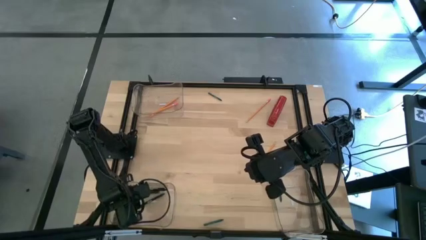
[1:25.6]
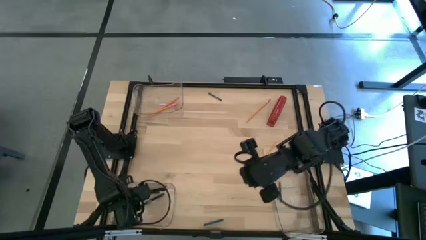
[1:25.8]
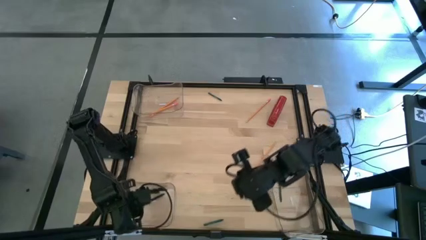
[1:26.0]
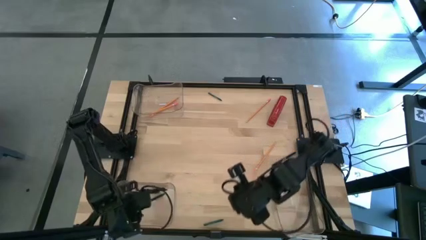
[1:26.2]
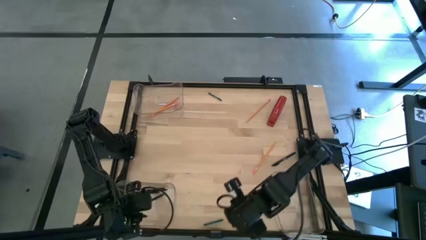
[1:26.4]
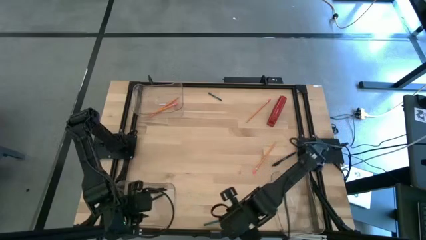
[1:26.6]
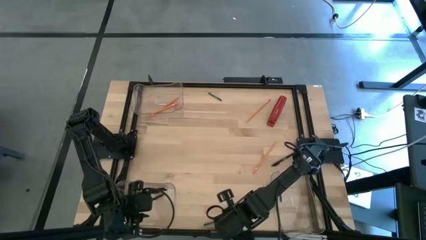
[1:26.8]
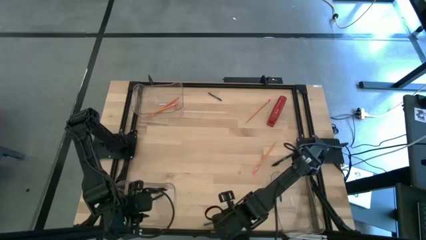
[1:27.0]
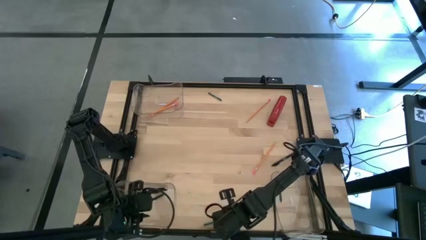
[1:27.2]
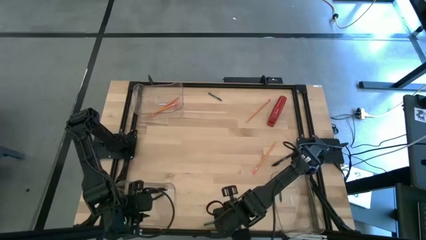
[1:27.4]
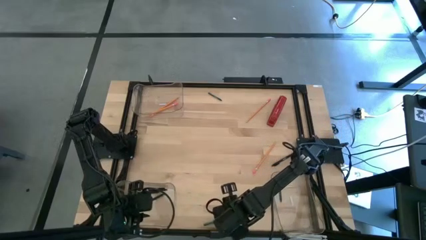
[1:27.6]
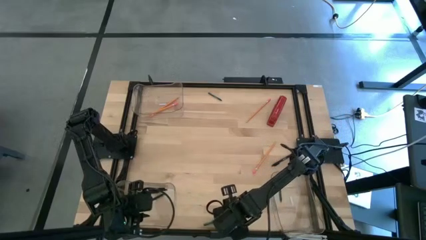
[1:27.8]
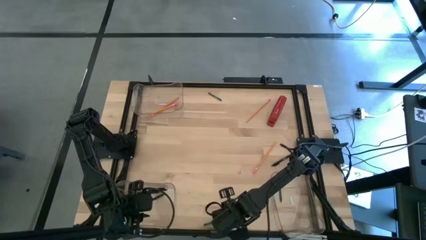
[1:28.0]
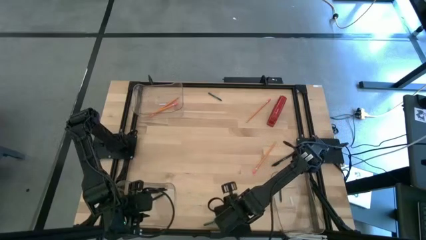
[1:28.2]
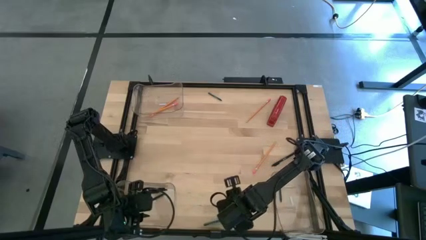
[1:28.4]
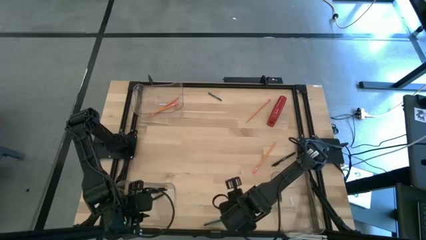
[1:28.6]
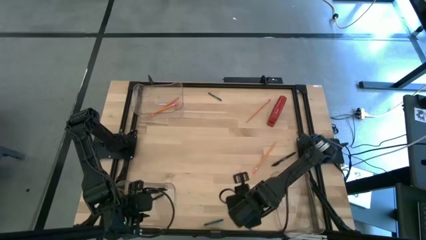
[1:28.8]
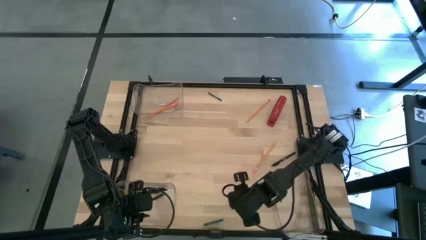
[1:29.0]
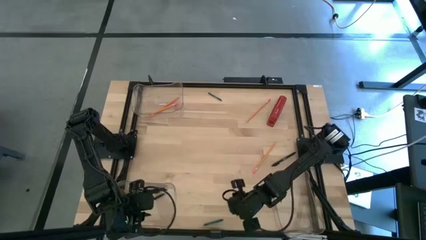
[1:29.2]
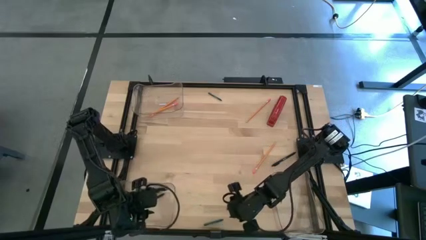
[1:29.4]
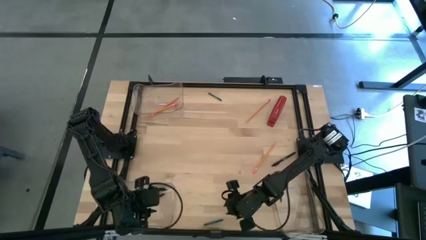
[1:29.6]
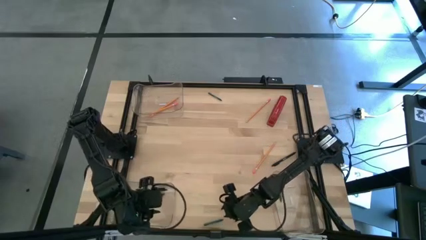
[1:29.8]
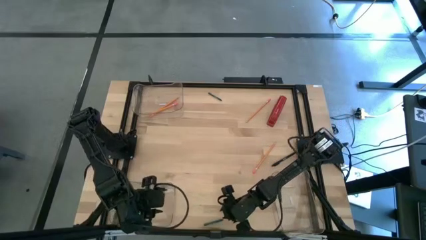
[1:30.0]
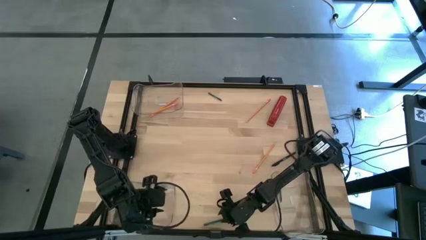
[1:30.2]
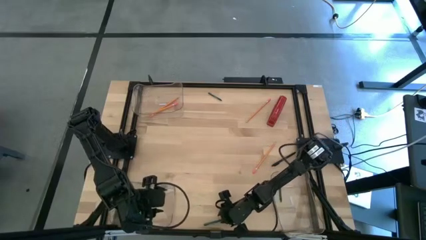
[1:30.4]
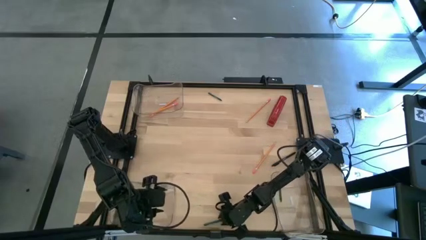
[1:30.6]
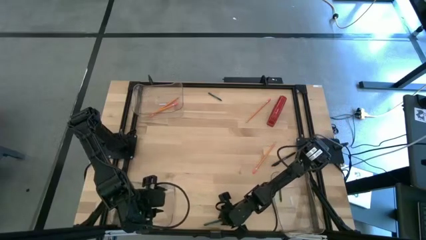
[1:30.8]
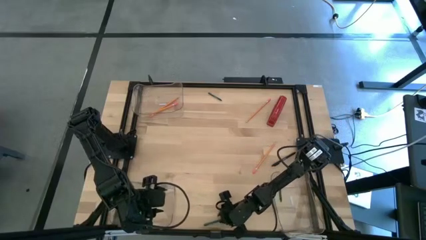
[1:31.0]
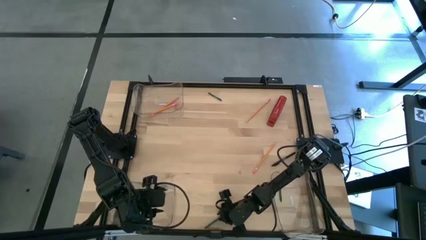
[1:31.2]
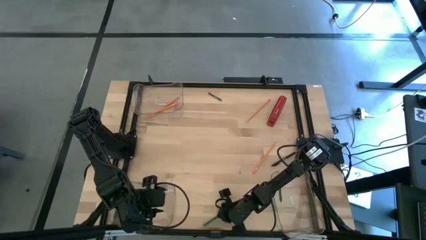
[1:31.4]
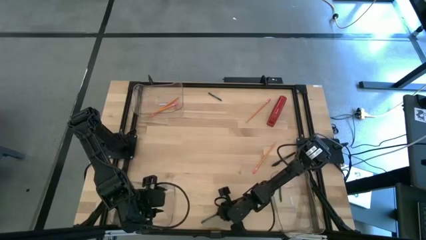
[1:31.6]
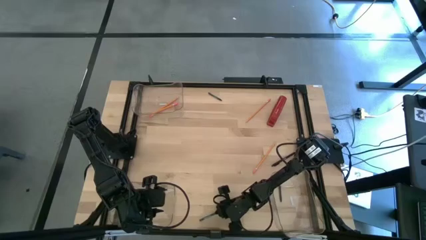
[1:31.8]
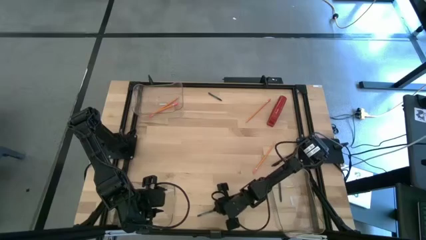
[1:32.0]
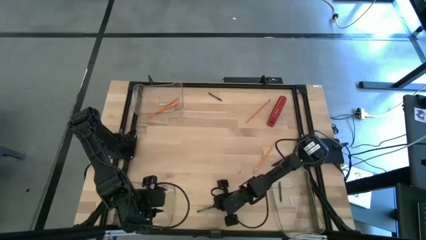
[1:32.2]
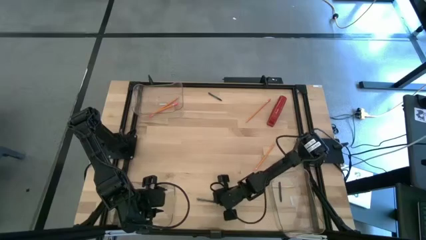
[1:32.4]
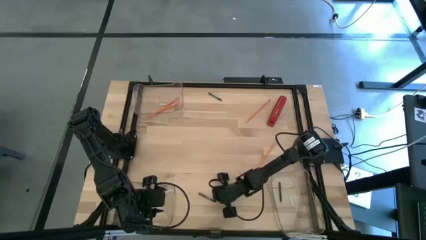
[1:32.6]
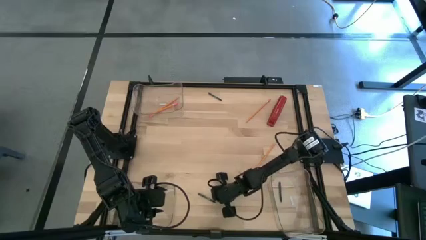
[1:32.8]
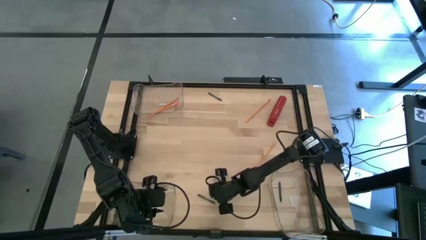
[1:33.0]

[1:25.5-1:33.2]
Task: Sort crayons/erasers/pens/pencils in bins
Put the green crayon into the bottom right transparent bin

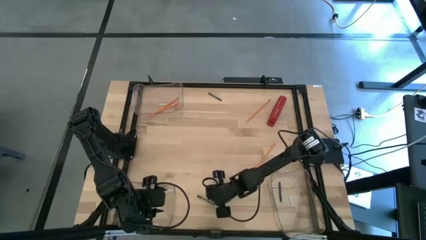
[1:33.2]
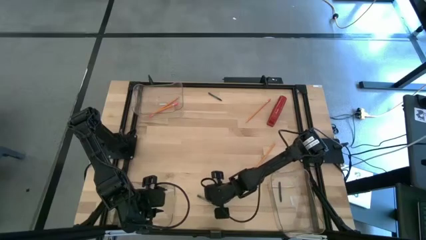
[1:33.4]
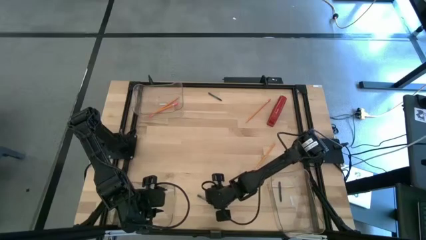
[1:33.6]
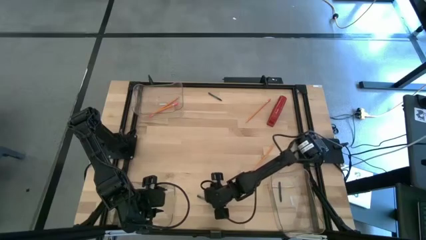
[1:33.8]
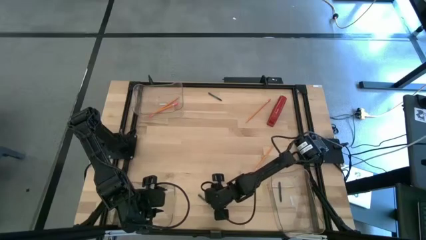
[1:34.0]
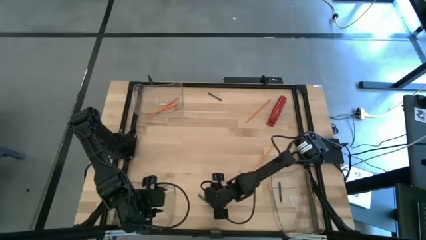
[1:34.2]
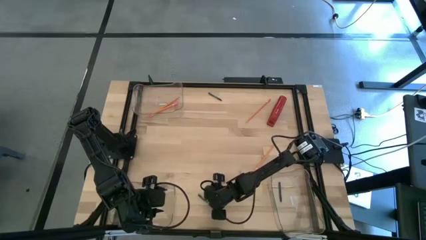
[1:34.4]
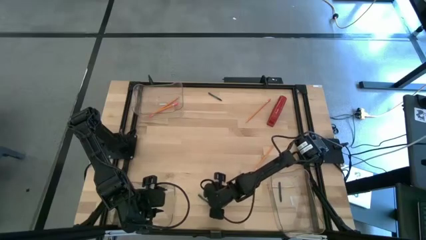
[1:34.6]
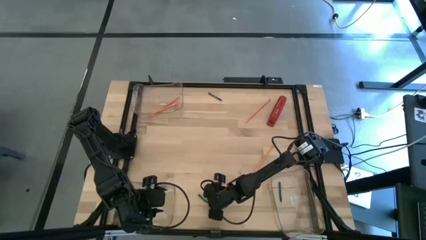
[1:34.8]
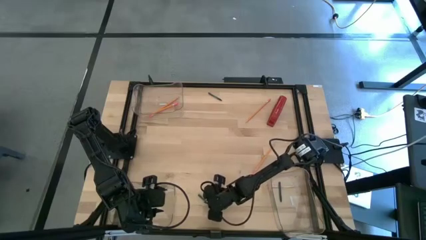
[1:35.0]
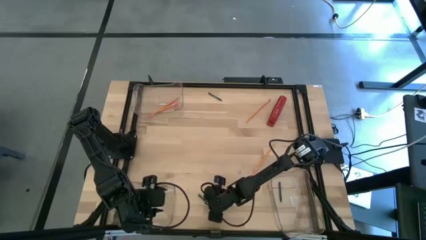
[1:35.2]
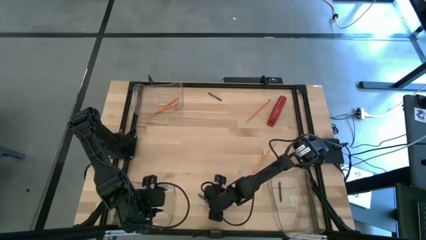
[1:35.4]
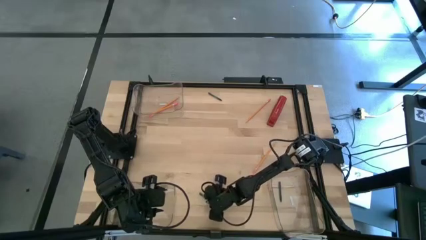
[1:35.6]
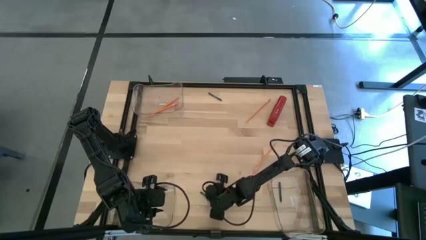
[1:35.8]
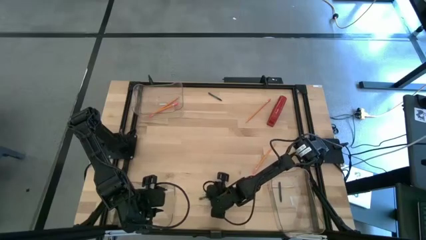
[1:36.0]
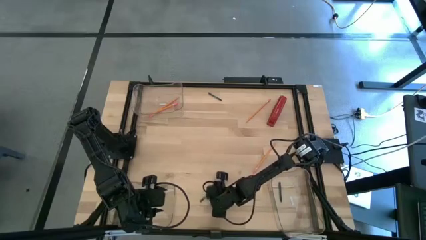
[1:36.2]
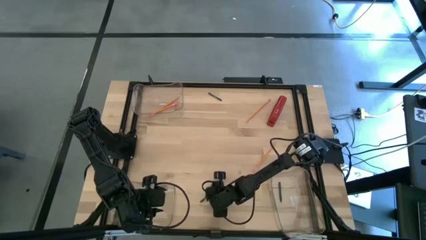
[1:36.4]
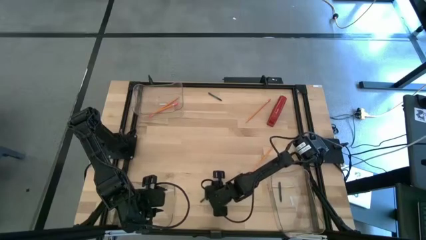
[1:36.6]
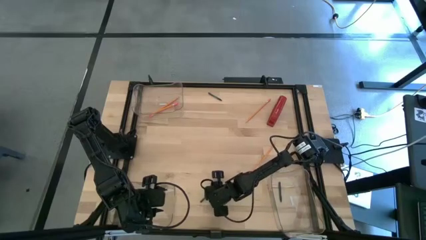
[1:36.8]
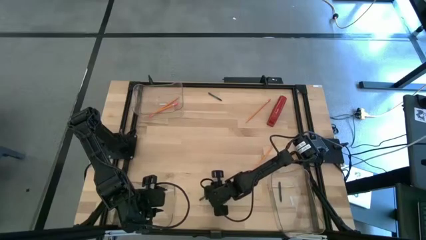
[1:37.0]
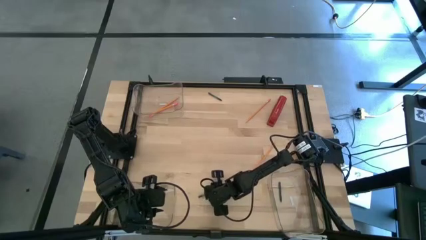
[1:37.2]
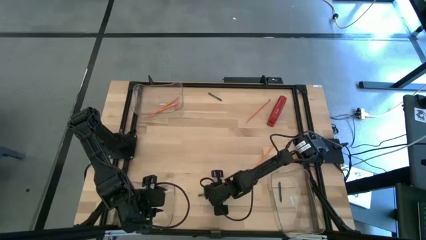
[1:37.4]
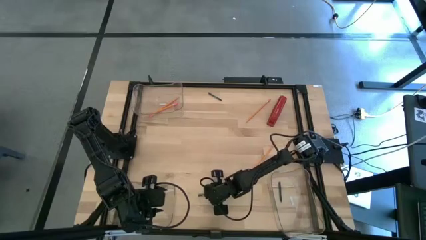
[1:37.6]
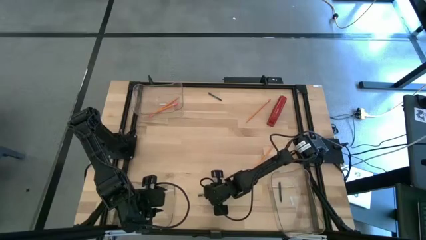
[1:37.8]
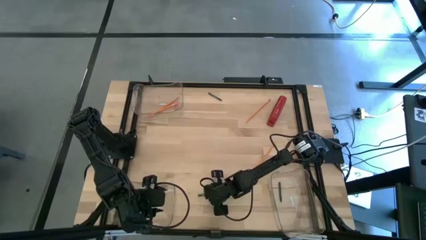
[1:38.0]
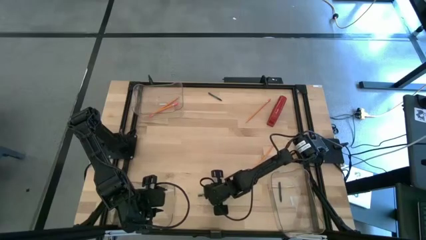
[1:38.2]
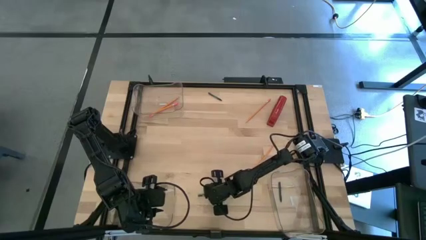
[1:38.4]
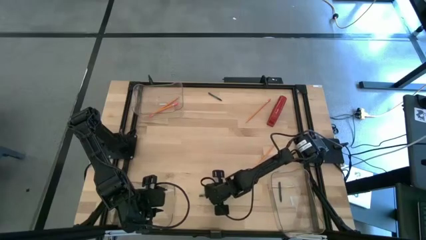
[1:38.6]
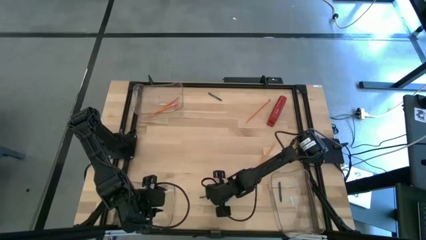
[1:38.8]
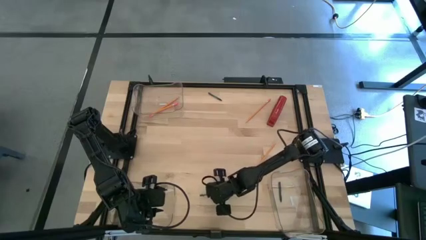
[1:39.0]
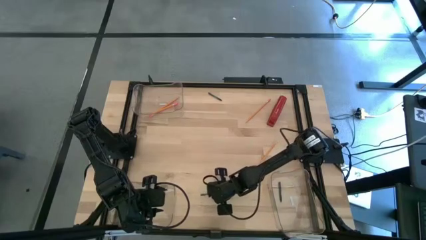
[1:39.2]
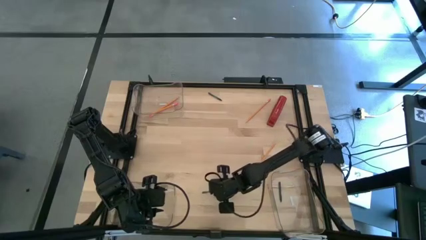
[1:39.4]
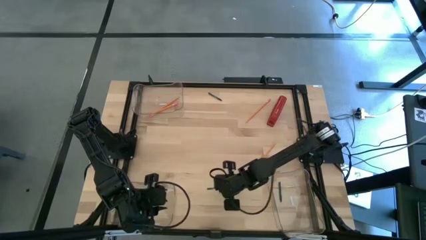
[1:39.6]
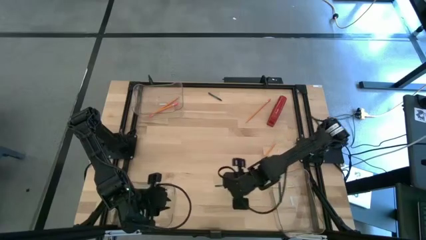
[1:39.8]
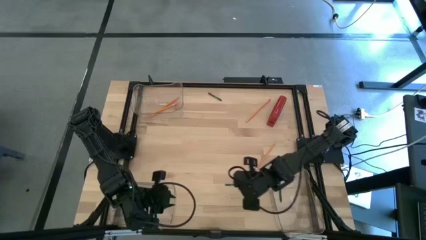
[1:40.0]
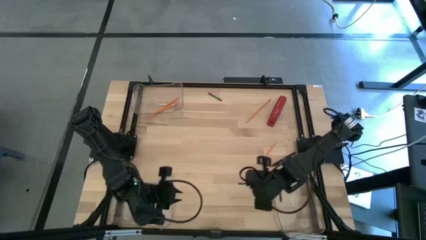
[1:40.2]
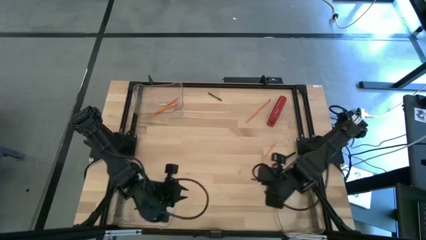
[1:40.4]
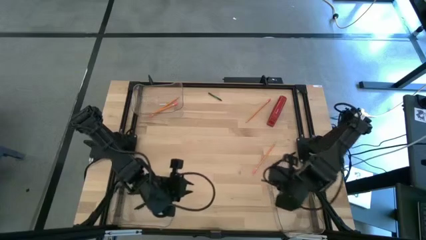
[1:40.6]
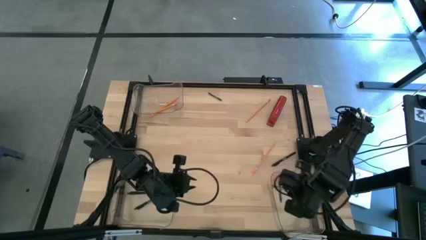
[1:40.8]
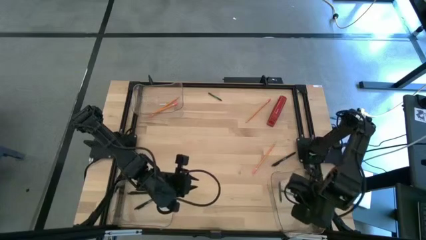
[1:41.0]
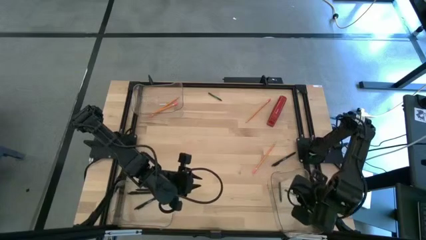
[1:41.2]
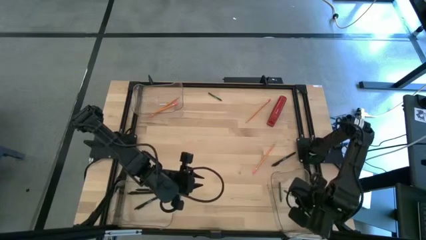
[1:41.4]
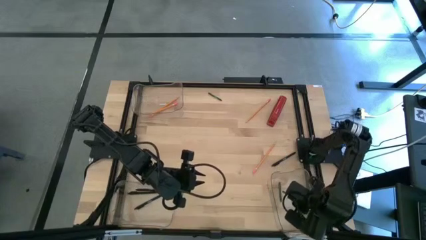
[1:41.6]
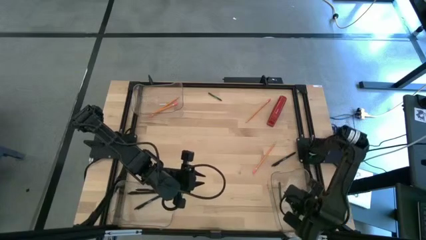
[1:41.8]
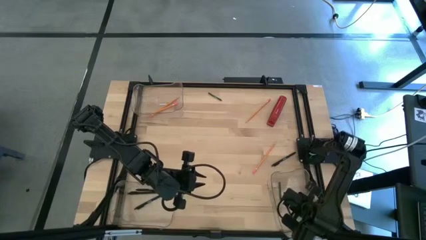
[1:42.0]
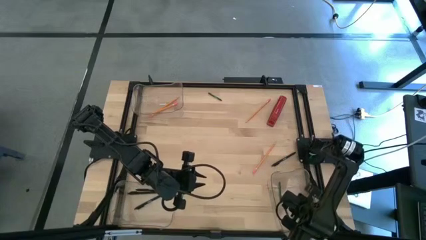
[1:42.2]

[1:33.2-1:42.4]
Put the green crayon into the bottom right transparent bin
